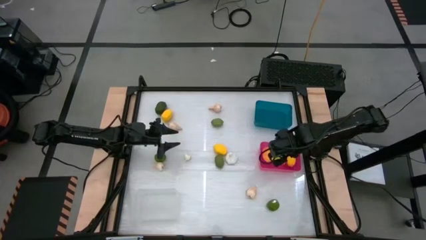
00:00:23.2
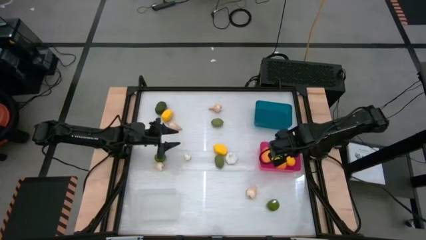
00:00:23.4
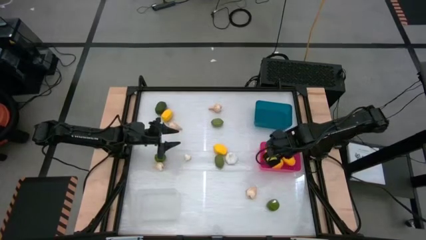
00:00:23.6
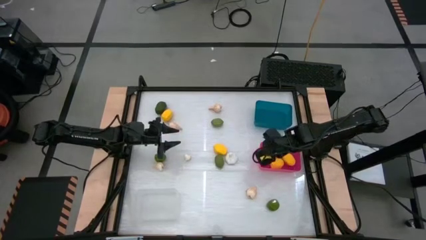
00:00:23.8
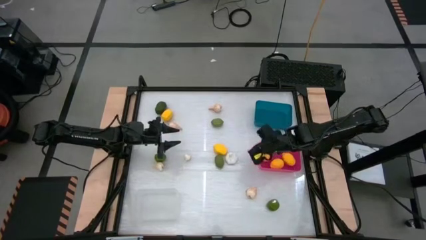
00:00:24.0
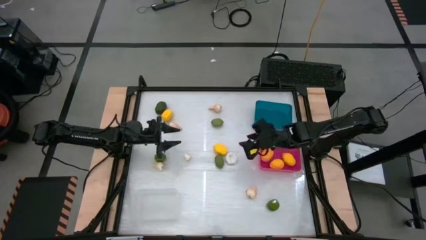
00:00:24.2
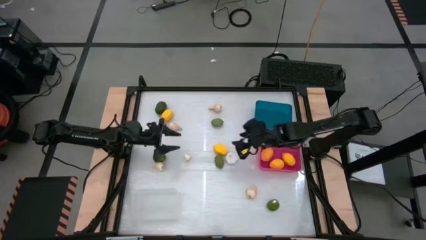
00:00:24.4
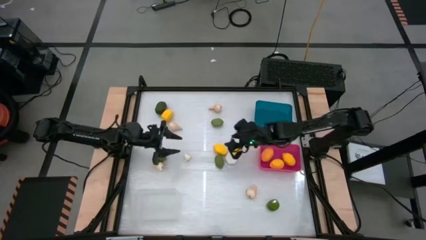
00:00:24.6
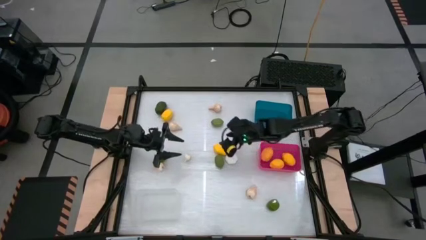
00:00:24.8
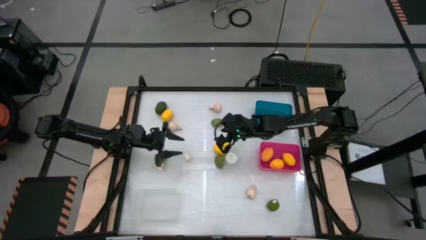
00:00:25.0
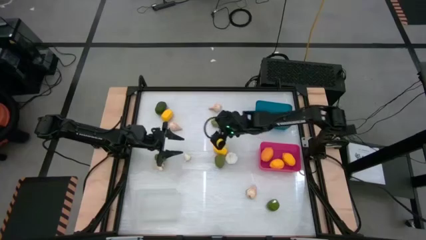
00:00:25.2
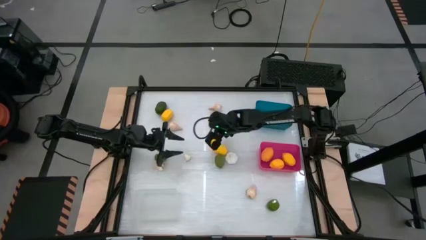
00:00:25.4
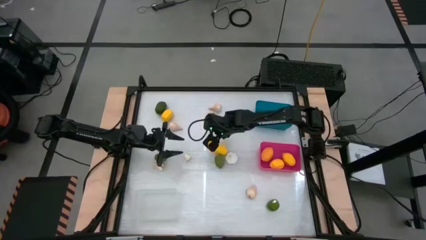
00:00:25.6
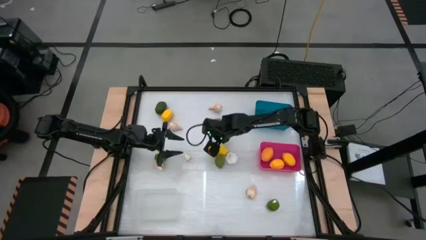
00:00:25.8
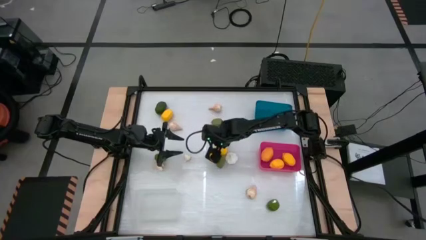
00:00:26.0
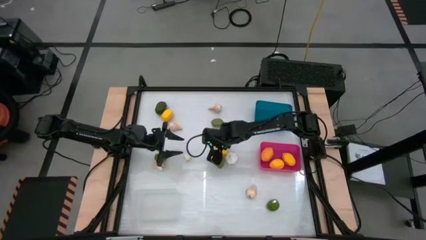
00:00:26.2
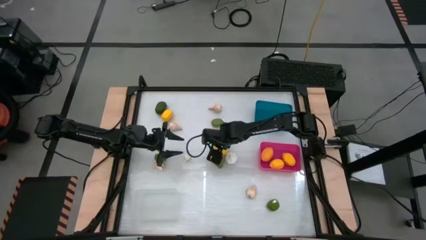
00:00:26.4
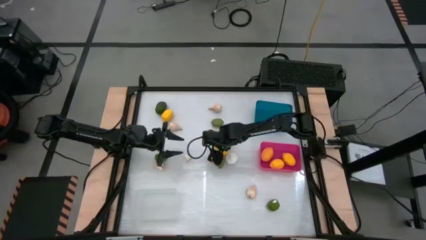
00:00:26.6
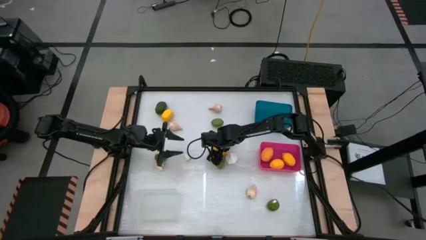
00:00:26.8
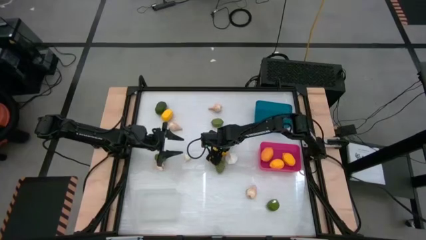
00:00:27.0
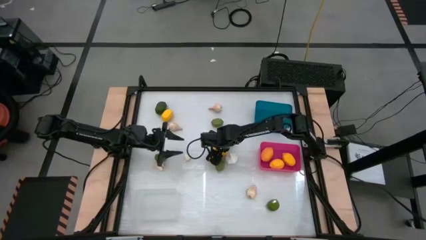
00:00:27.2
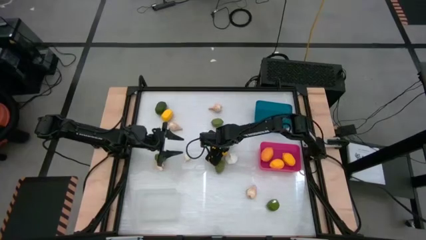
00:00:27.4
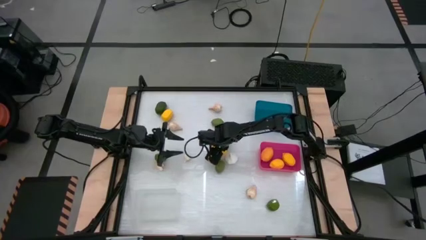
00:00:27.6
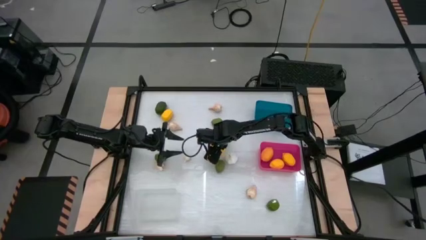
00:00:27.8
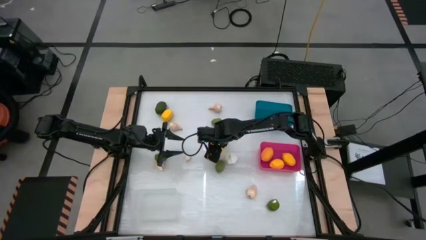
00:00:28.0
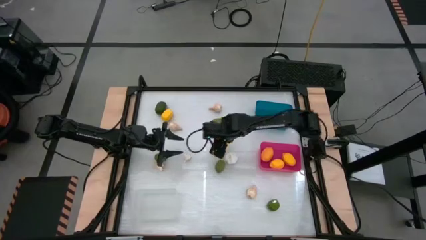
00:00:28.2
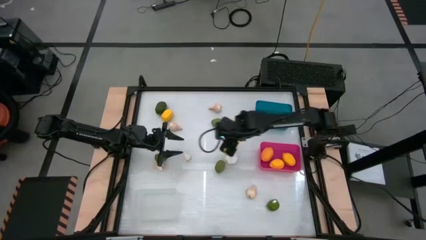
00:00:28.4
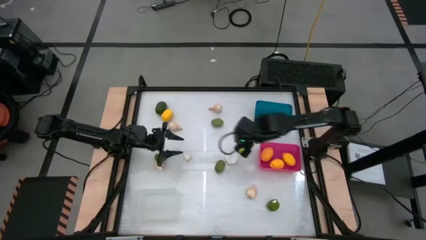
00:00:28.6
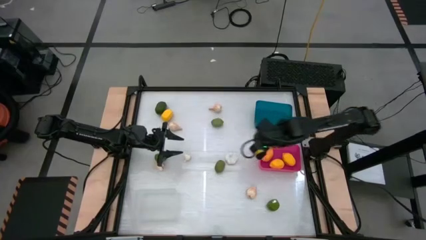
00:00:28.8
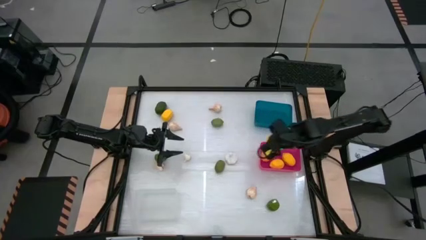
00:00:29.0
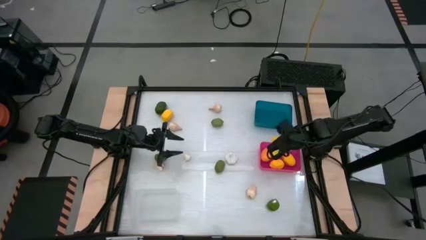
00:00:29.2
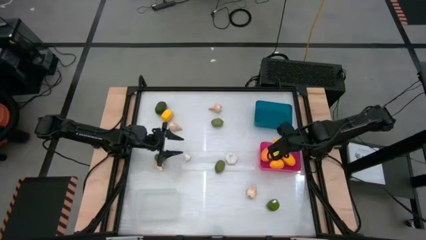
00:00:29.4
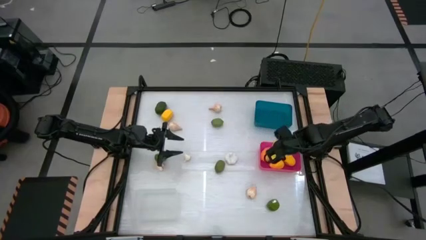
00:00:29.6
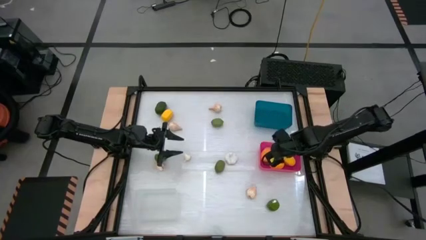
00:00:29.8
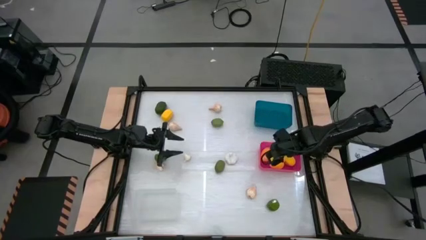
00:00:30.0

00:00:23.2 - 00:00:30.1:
Task: Sort produce into baskets
Put the yellow lemon into the pink bin

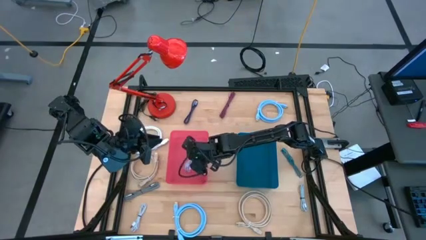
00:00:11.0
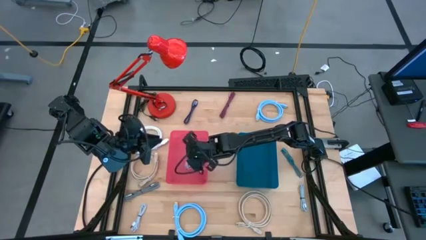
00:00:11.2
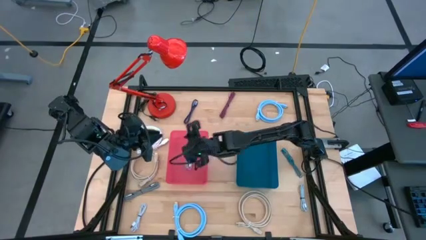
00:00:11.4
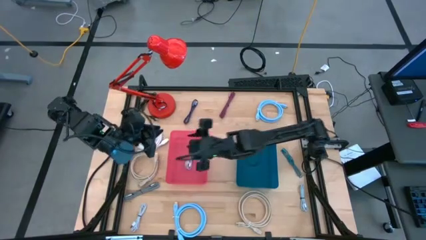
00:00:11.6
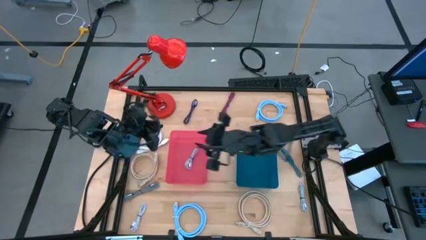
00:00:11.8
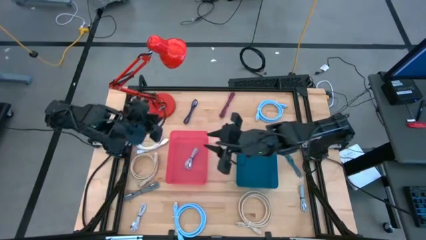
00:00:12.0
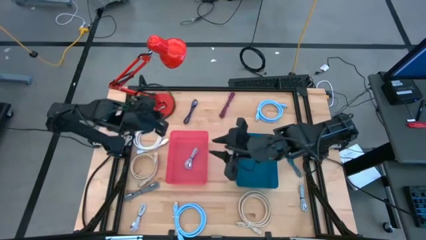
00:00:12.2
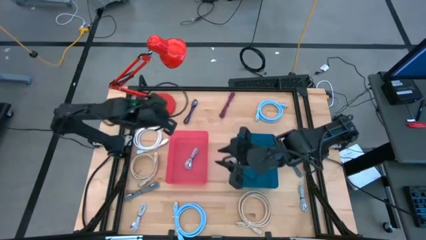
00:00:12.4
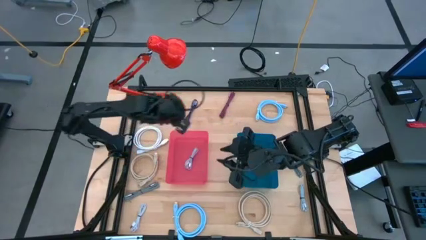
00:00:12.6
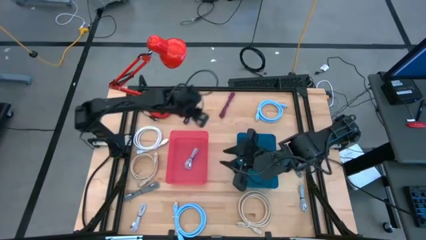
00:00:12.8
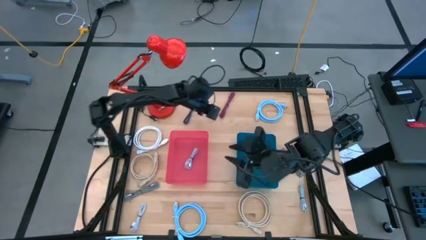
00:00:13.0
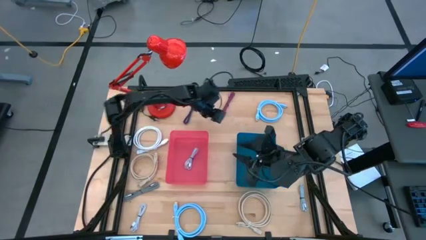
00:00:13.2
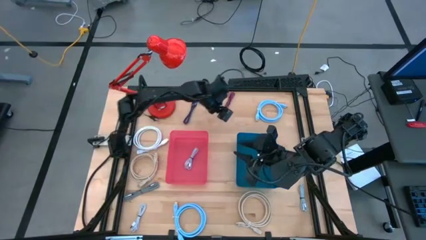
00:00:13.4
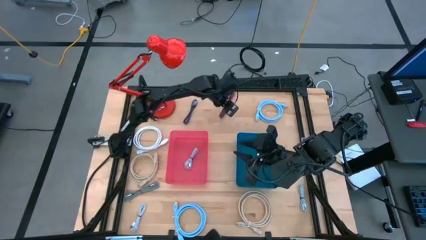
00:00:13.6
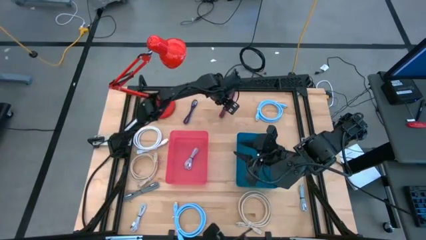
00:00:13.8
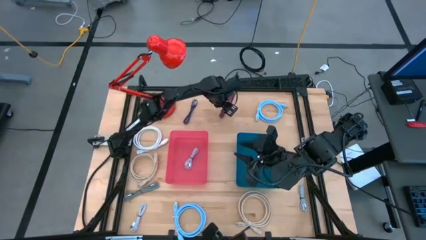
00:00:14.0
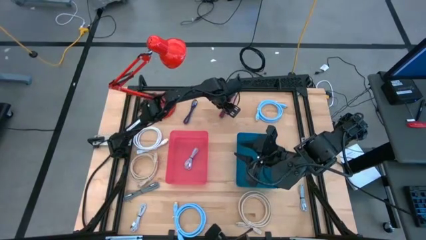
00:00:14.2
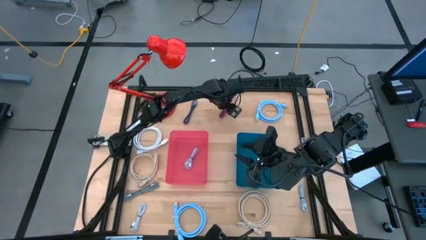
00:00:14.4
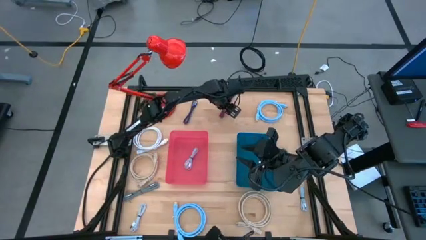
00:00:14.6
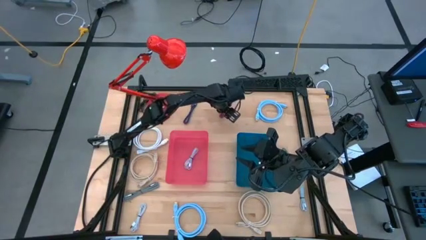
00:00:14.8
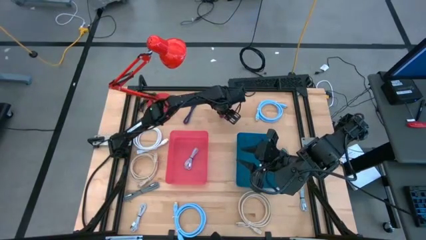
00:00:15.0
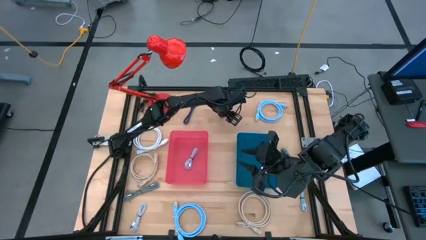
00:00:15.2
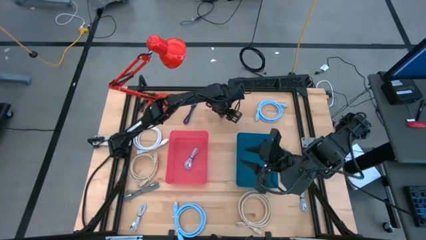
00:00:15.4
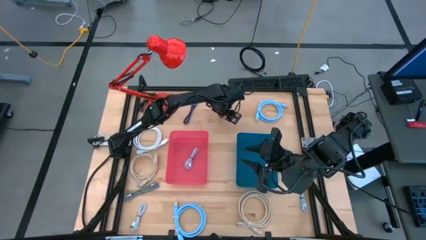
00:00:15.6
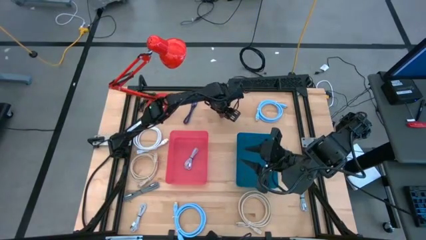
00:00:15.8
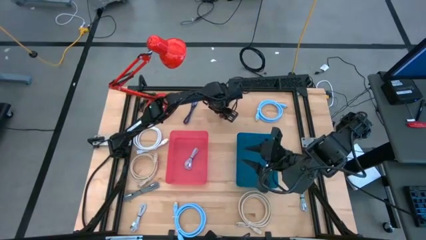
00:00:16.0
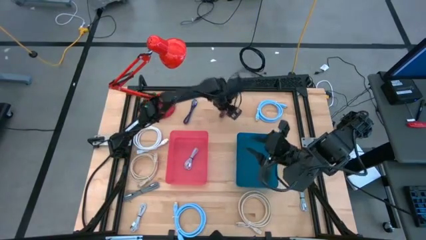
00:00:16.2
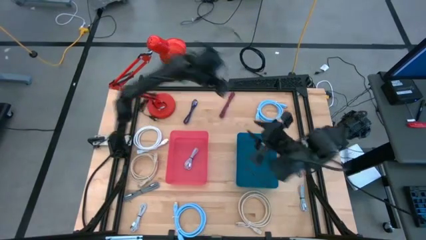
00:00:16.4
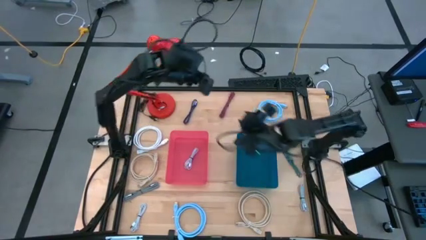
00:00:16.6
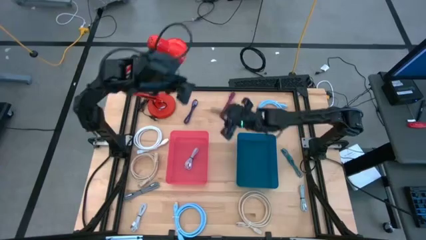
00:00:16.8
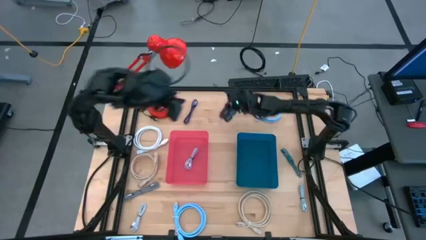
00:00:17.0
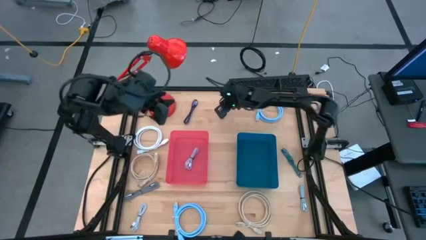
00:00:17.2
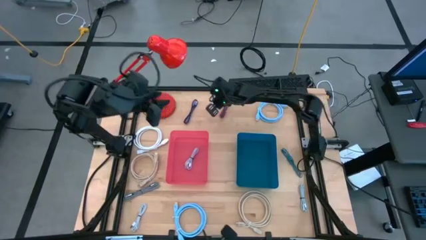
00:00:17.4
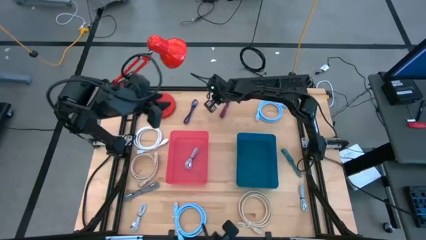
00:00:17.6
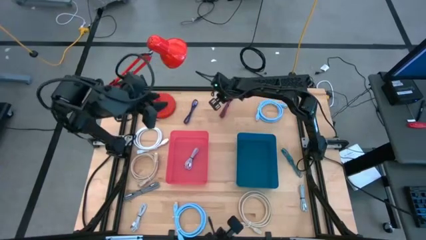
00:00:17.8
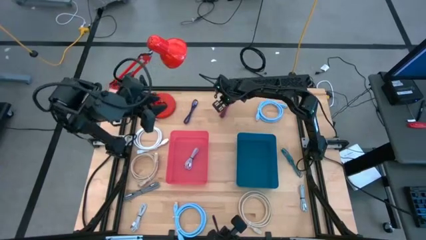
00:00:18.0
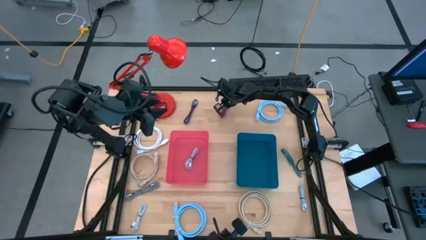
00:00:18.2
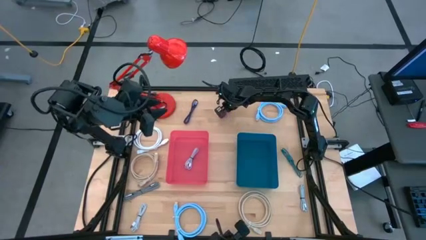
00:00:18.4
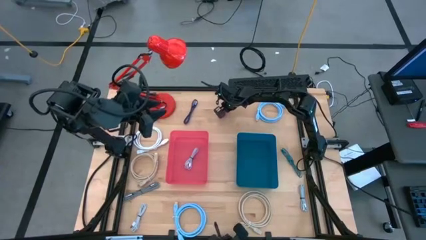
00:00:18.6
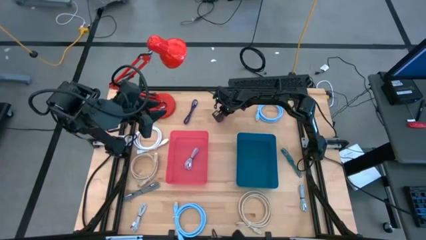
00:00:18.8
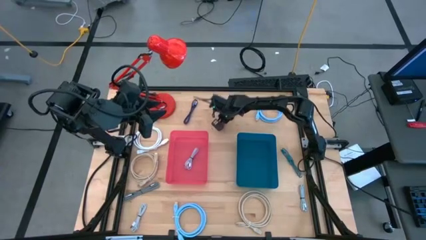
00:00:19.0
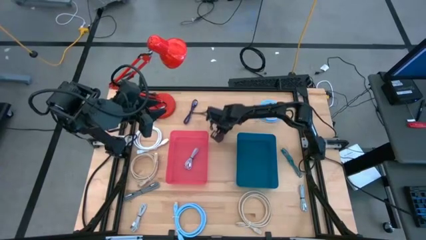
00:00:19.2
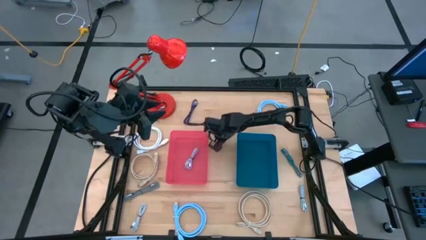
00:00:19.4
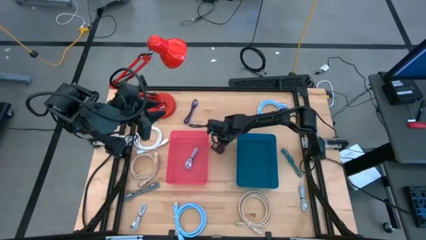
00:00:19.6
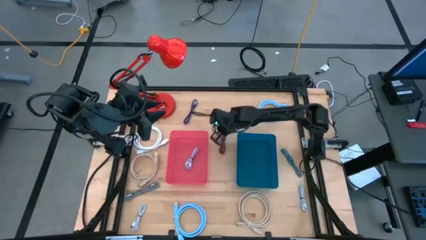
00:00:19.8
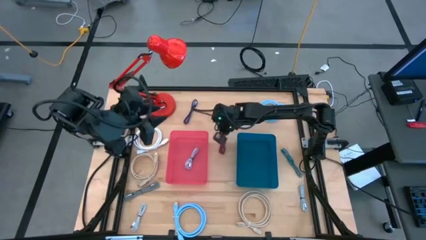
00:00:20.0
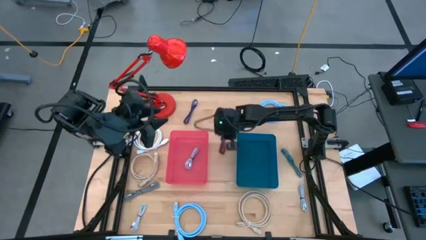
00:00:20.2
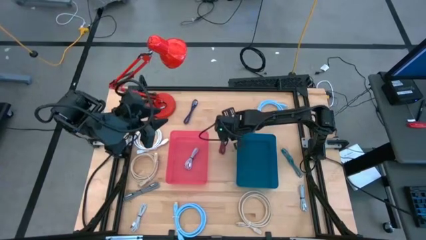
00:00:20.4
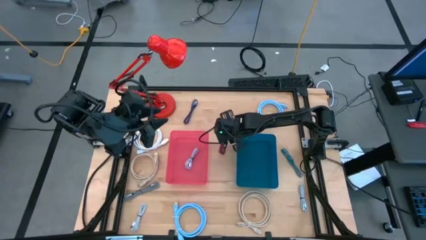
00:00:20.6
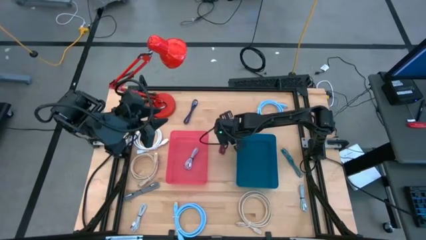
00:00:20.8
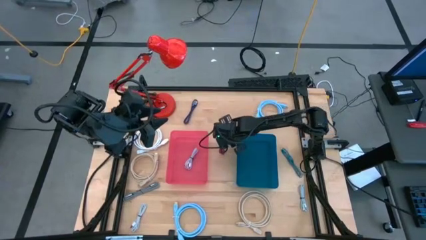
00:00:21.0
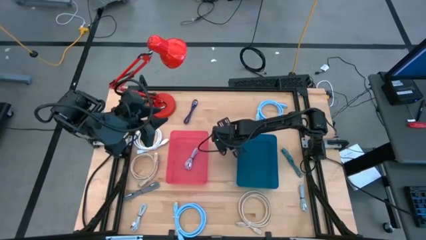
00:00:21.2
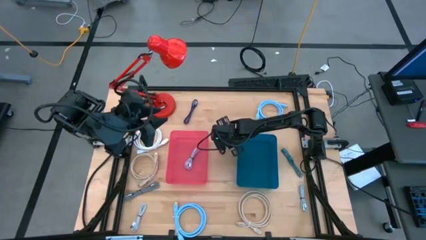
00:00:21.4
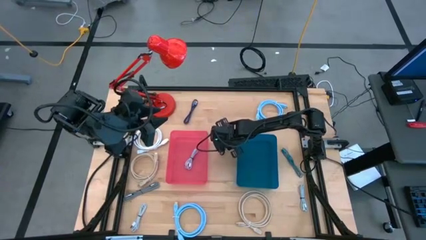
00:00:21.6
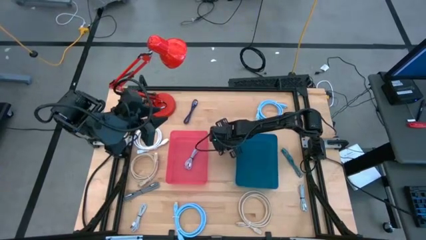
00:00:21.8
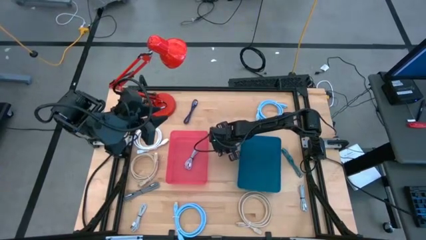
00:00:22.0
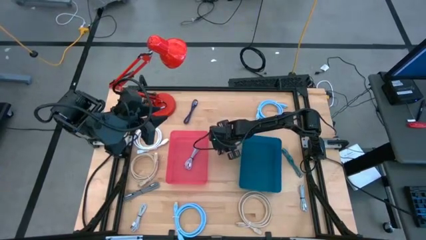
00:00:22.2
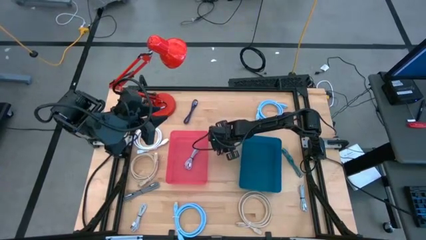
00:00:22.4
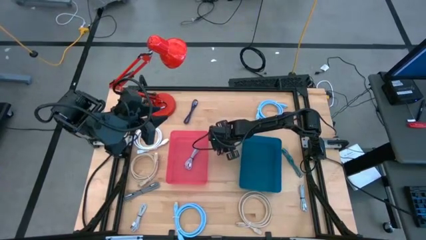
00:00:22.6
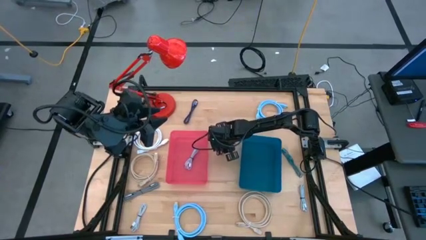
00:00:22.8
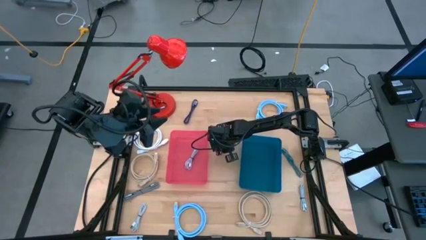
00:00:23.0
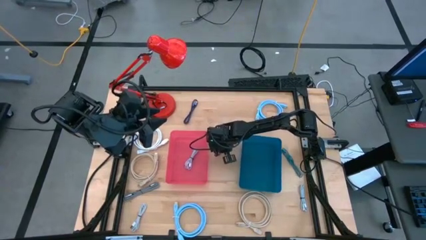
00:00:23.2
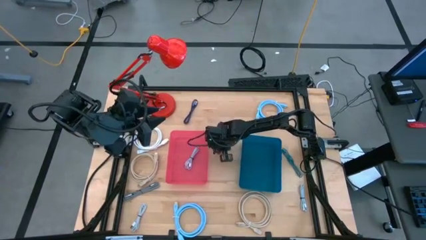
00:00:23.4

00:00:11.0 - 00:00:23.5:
Task: Pick & Place USB Port
Put the black and pink charger cable into the red bin
